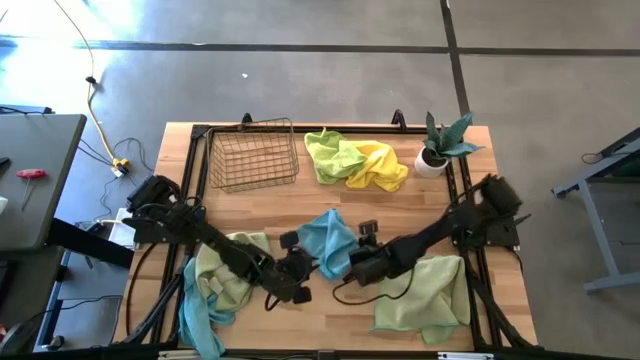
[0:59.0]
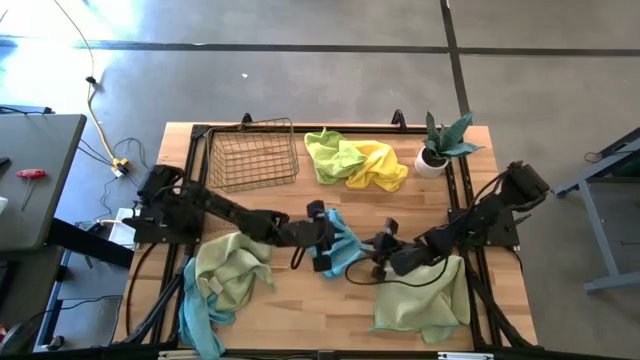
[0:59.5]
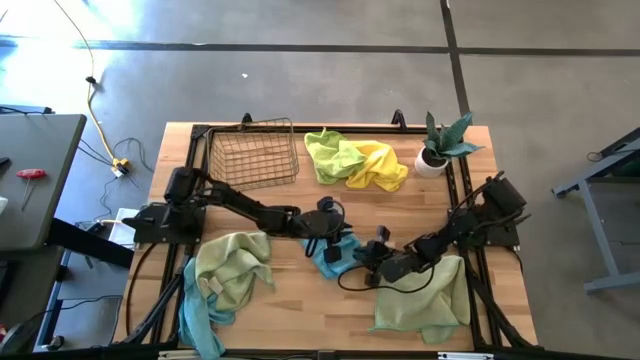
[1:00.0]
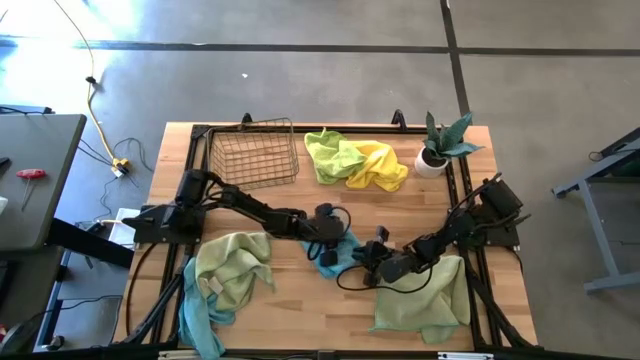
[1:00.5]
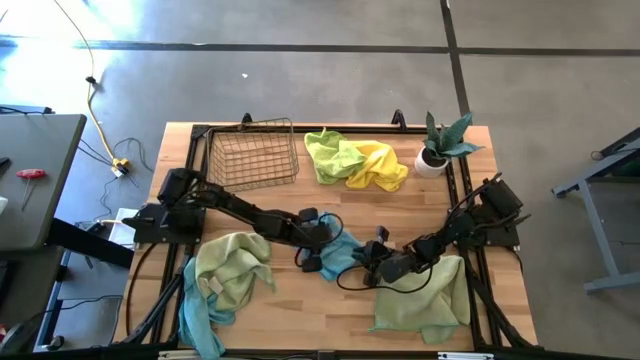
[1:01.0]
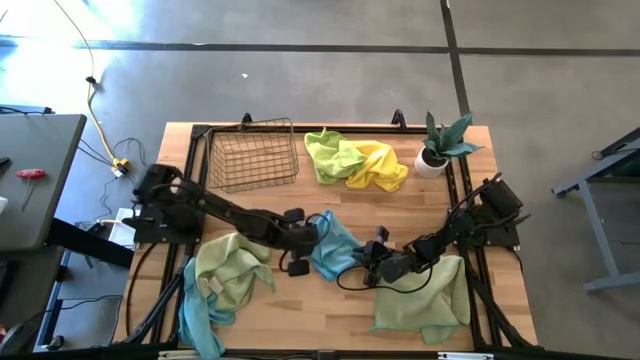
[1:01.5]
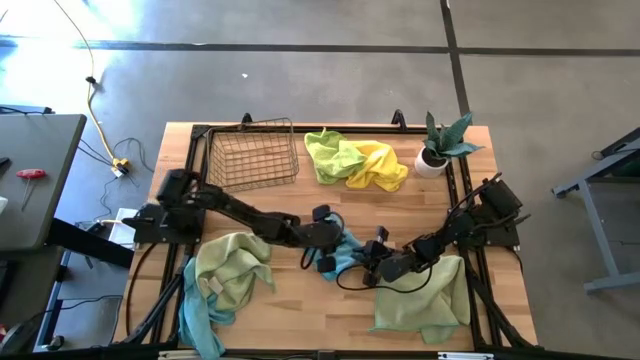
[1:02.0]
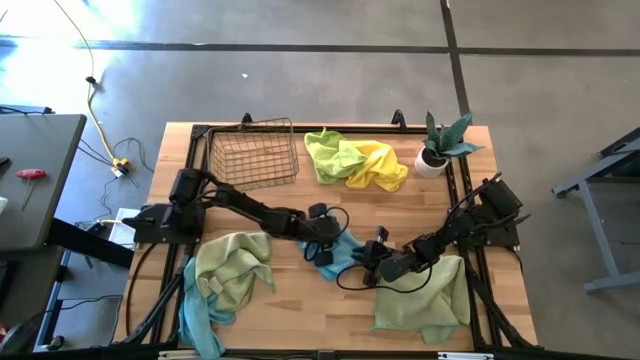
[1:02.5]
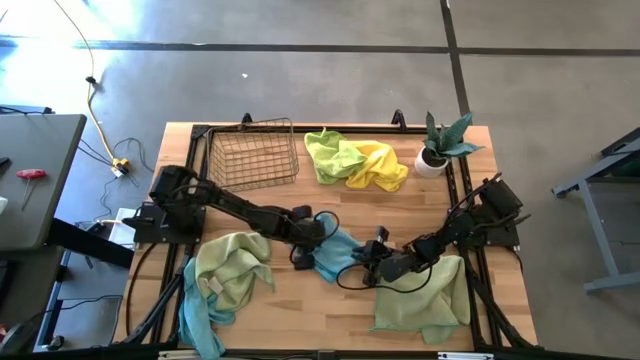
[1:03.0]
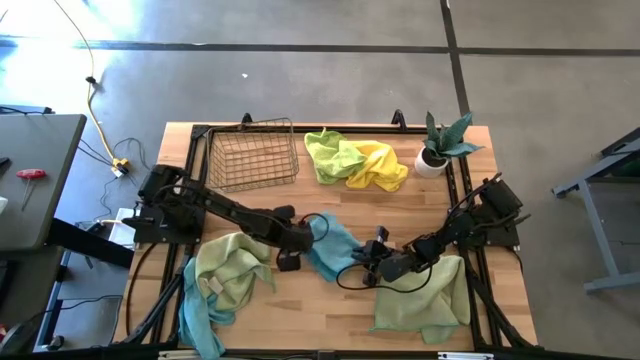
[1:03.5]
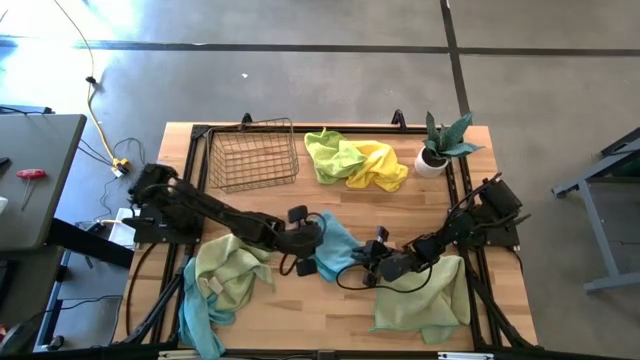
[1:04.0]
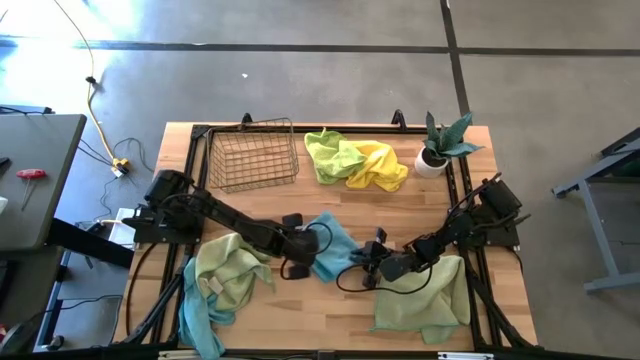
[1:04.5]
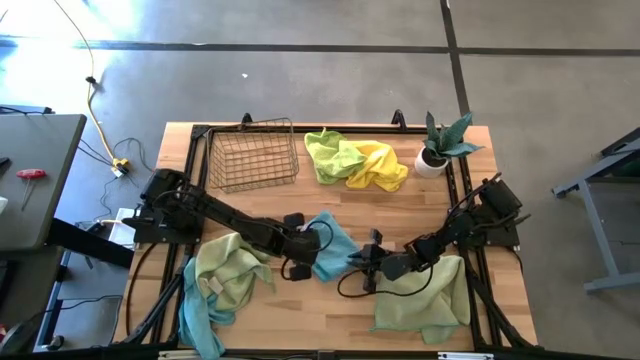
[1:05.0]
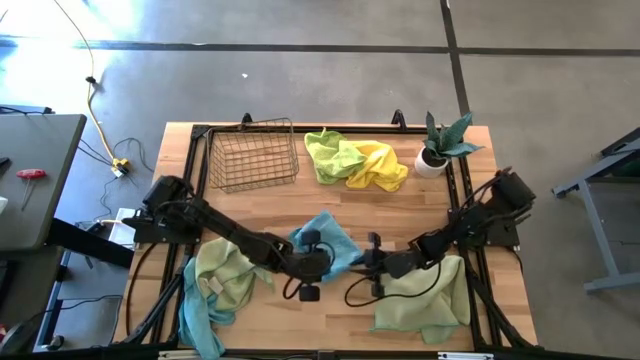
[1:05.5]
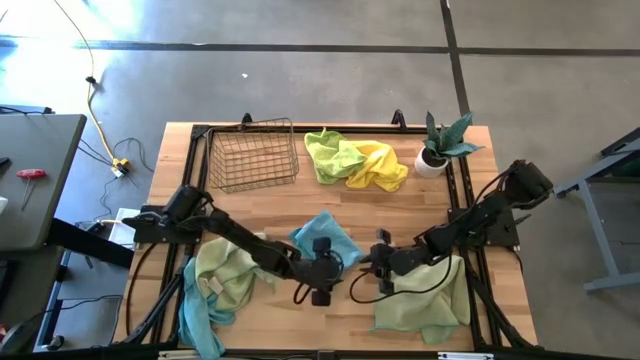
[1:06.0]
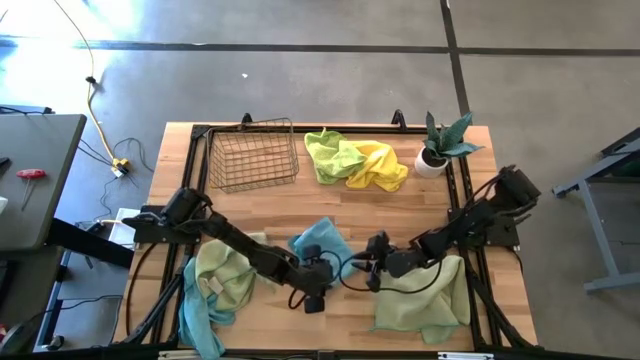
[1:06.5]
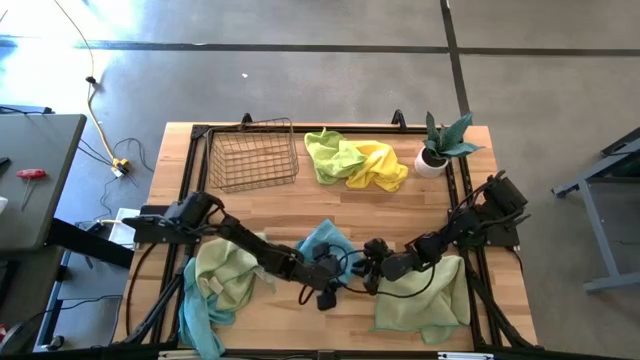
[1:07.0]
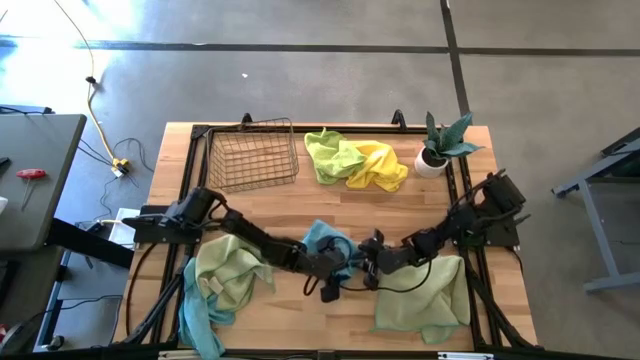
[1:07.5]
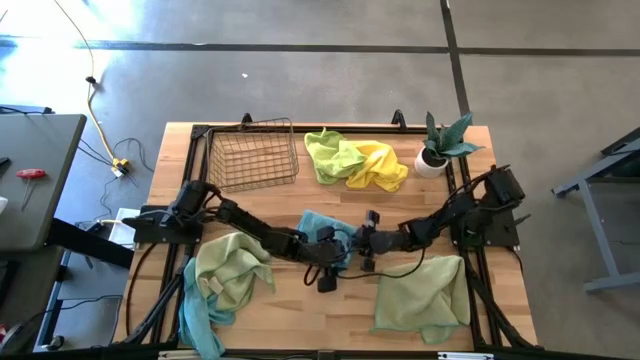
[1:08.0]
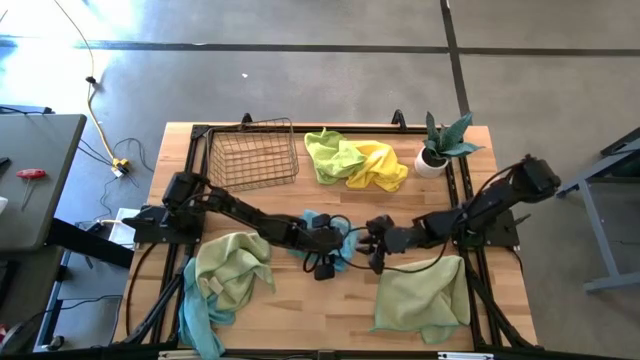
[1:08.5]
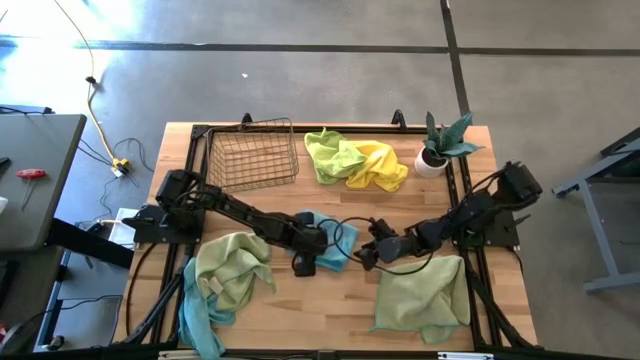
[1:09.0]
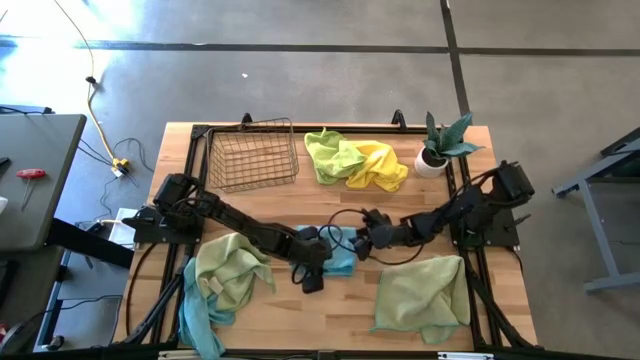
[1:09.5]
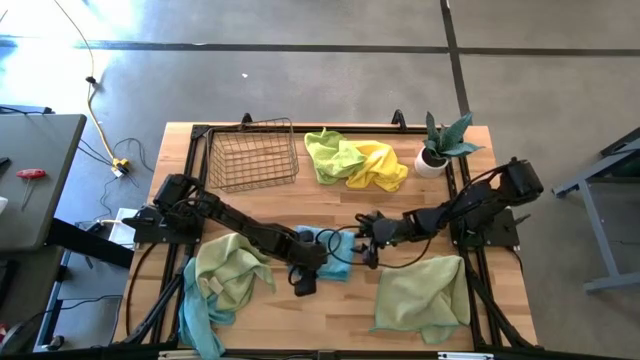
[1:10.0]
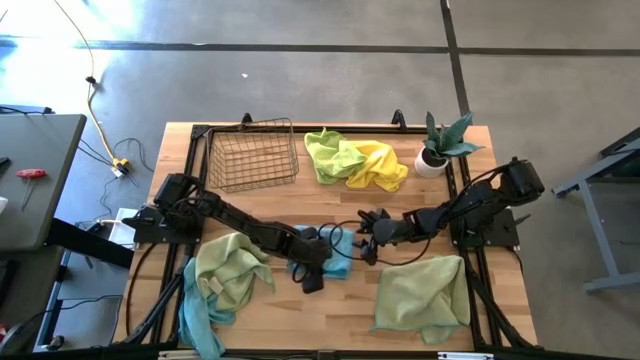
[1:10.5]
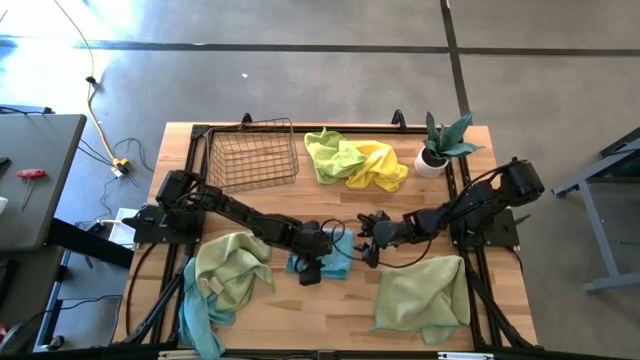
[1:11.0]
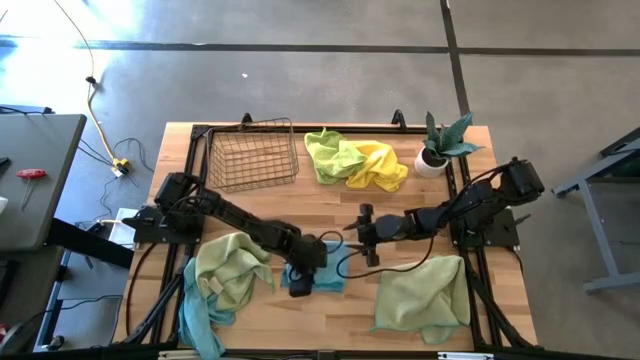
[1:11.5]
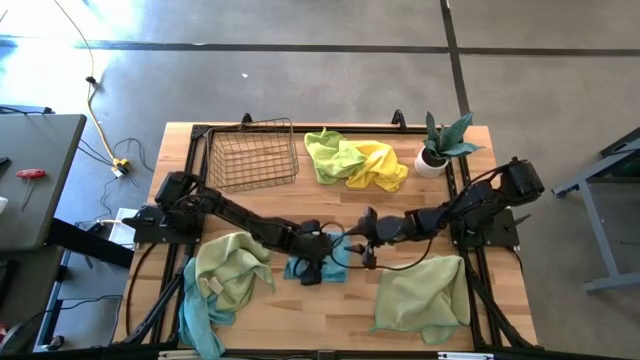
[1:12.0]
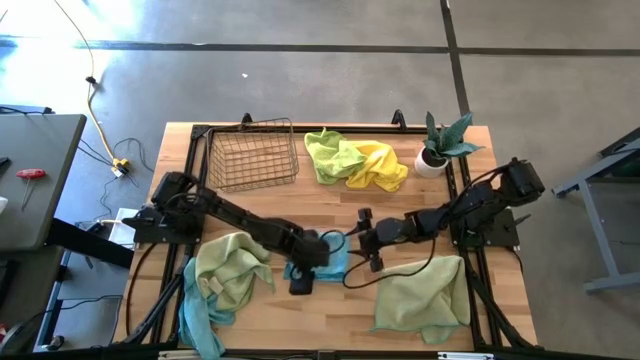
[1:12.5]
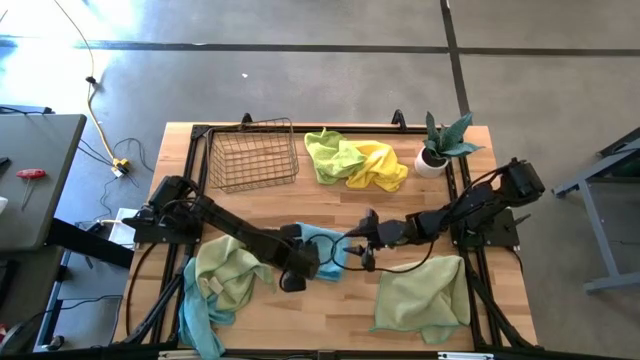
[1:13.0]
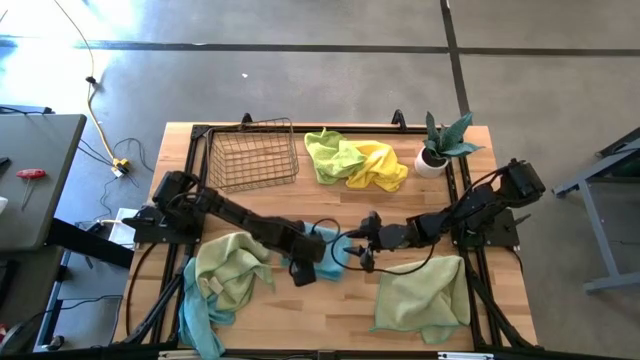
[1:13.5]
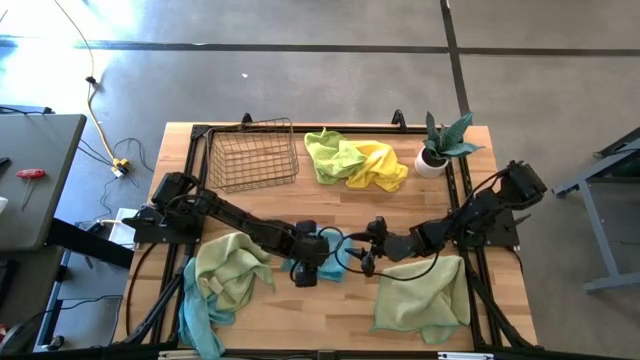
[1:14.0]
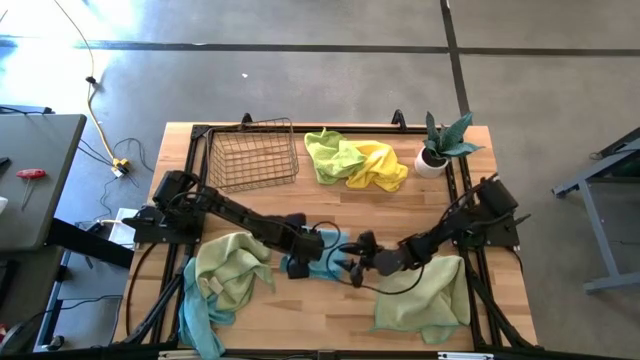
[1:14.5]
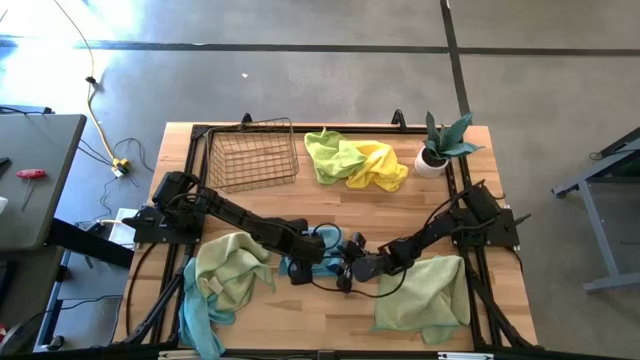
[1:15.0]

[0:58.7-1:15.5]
Task: Fold microfiber towels
Fold the right blue towel

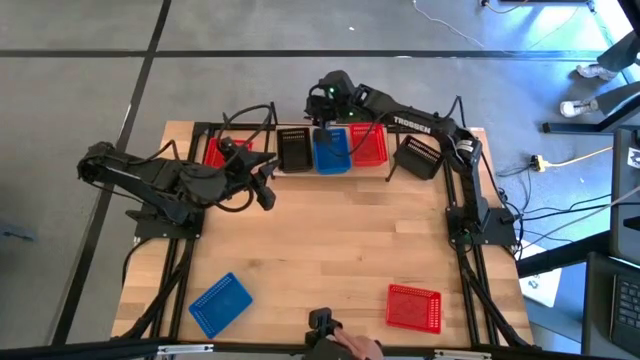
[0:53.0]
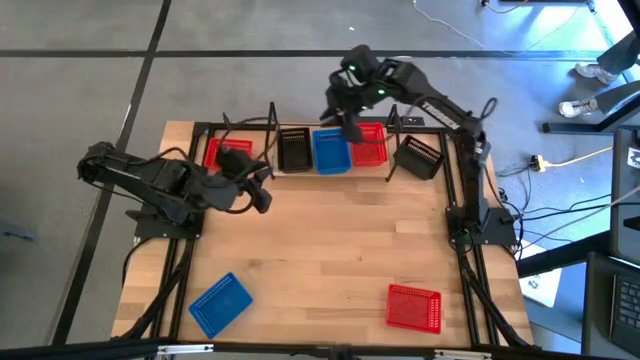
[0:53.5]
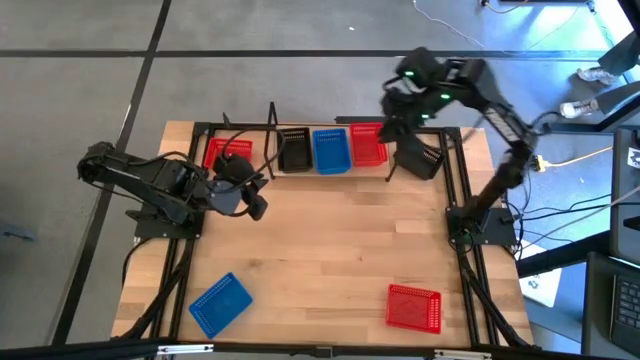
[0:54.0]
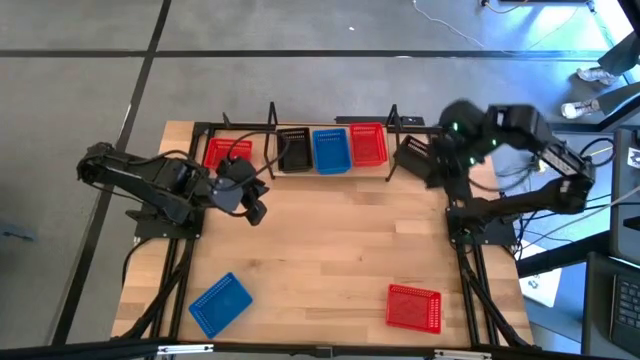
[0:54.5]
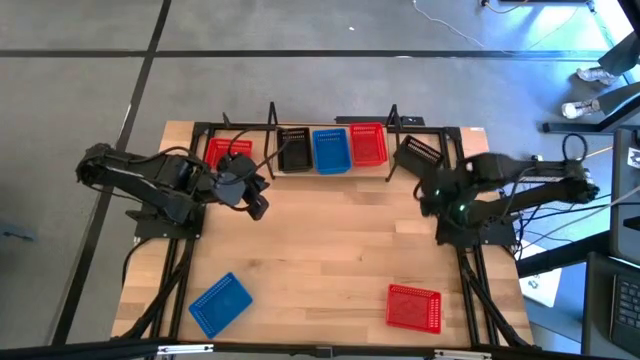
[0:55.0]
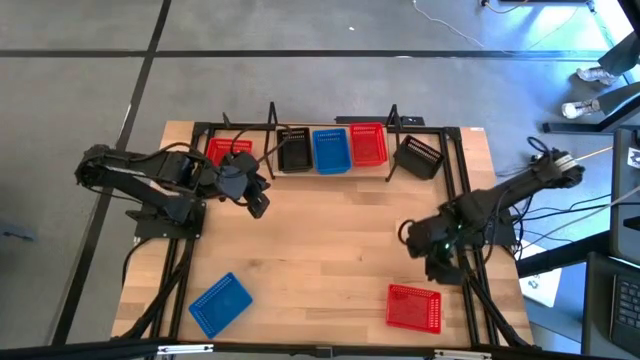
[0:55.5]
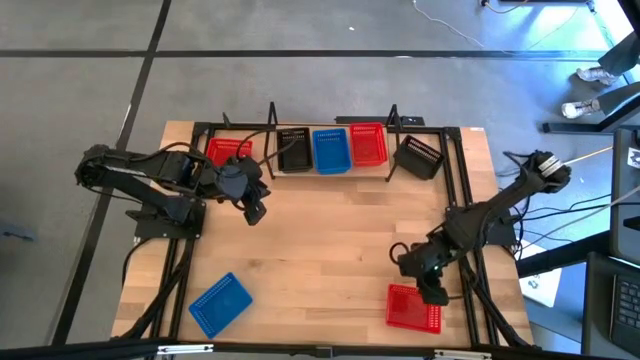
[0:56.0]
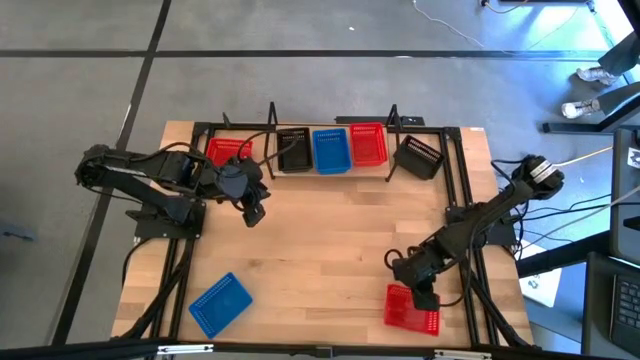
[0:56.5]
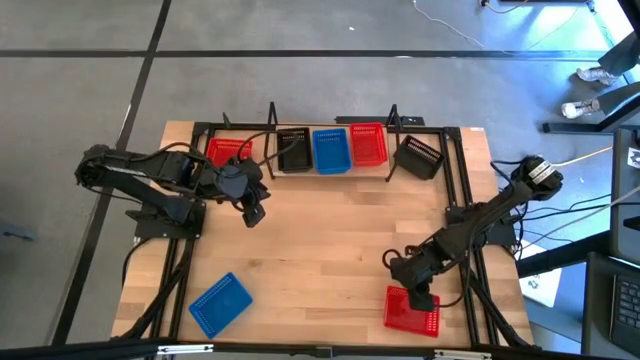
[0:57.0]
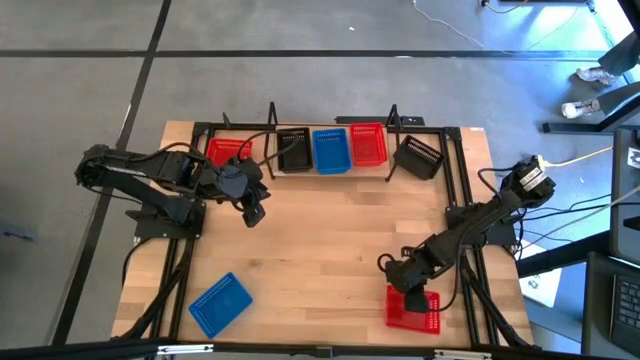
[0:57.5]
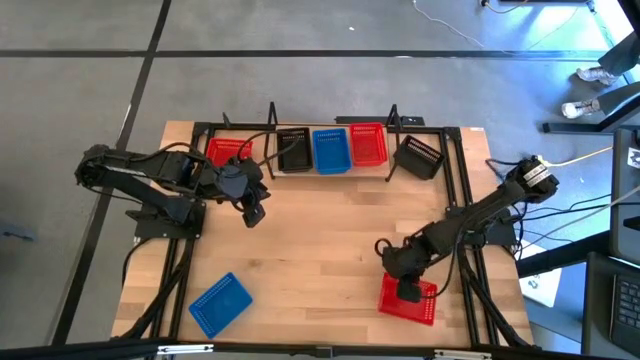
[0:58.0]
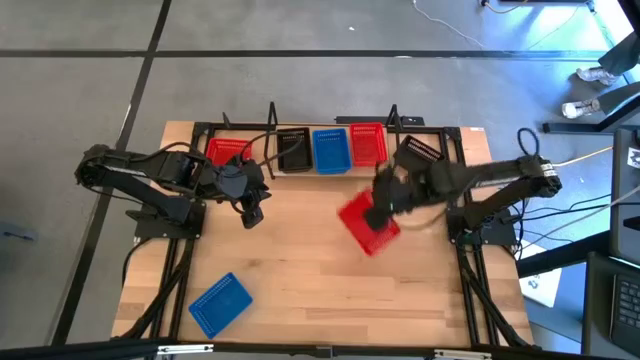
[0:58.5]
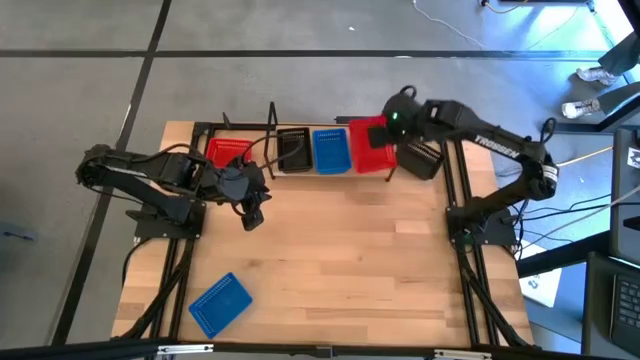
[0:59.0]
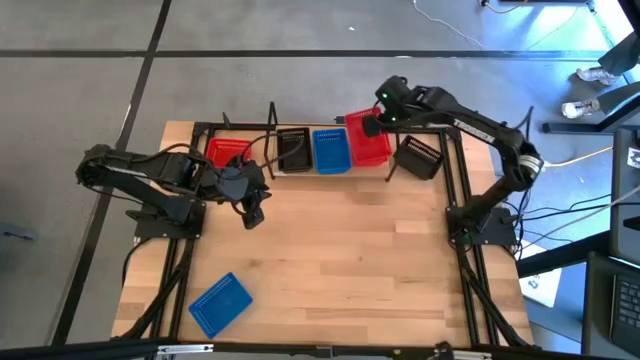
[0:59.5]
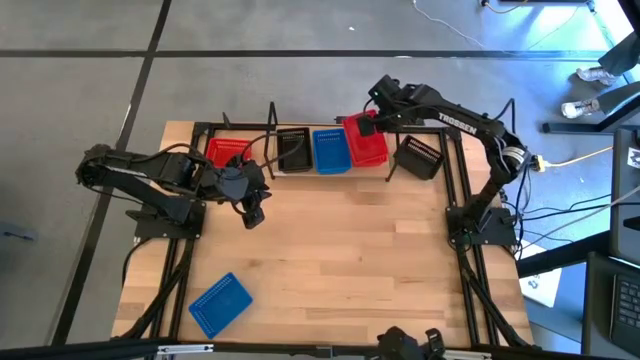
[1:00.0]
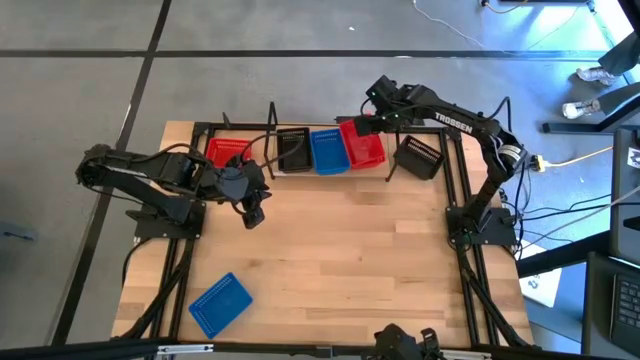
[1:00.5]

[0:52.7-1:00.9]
Task: Stack baskets on shelf by color
Stack the bottom red bin on top of the red bin on the shelf
